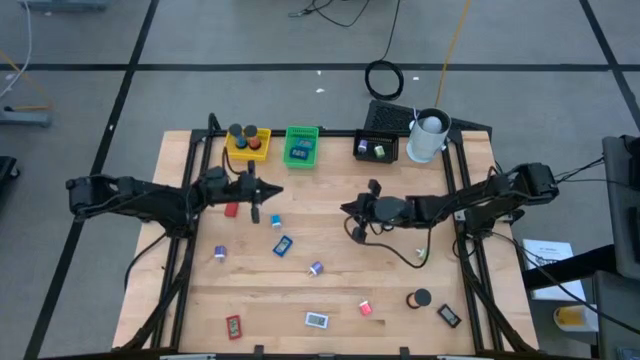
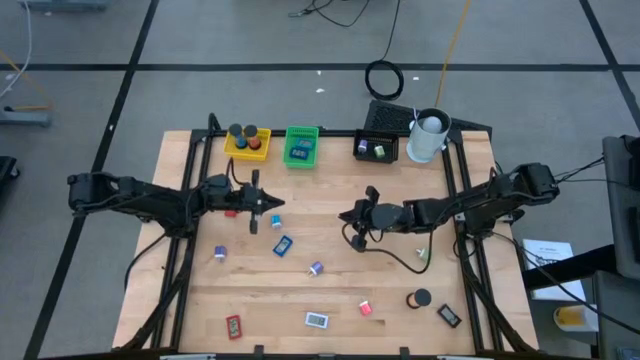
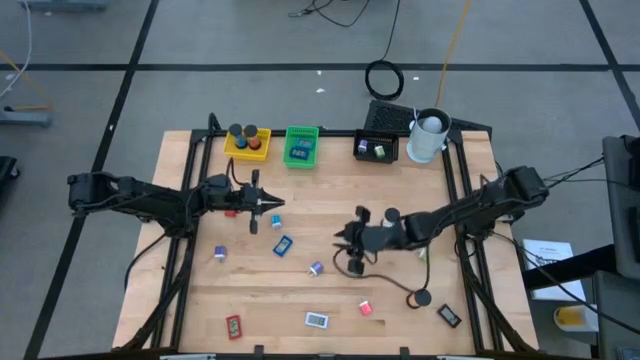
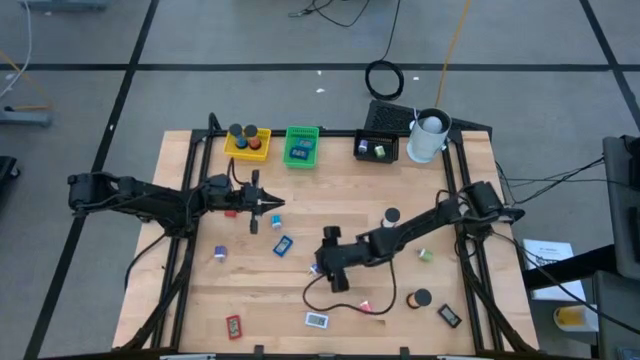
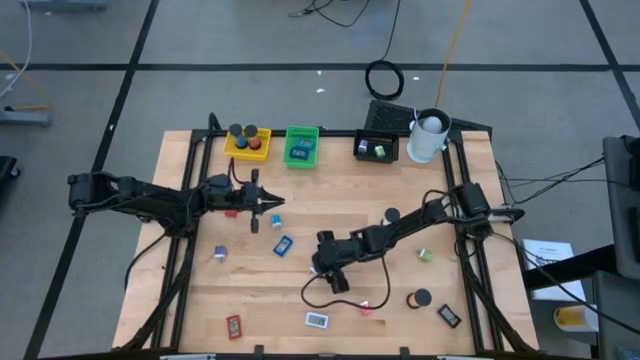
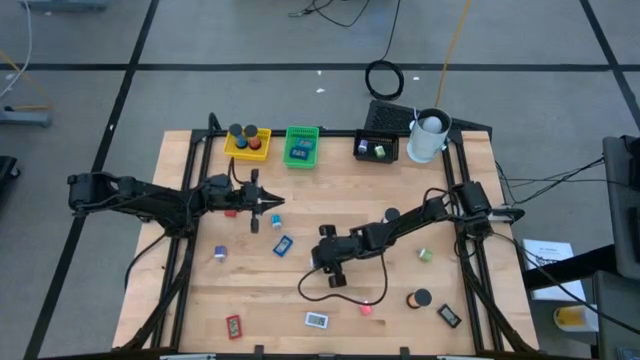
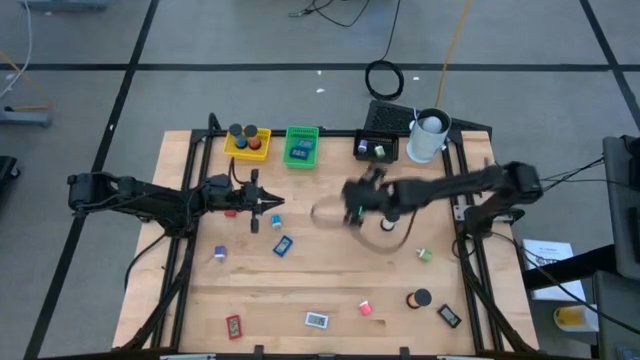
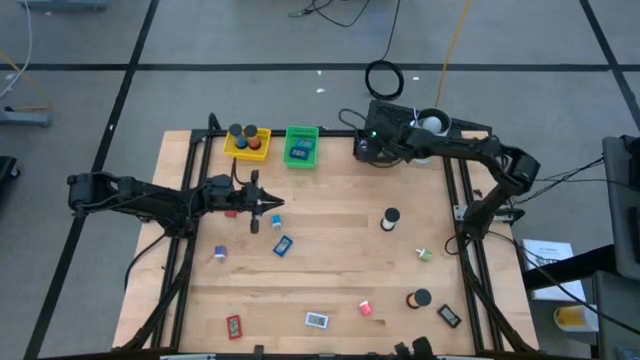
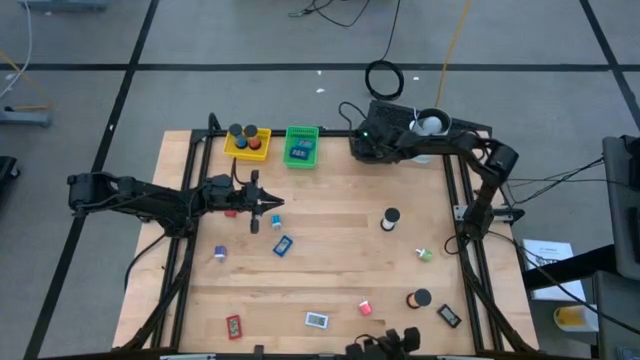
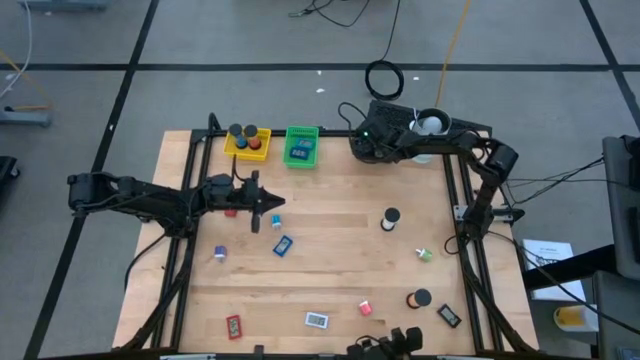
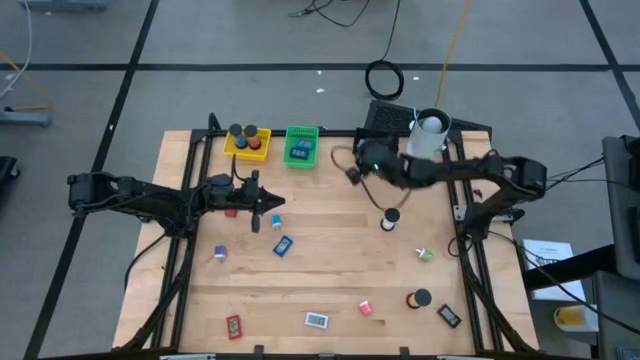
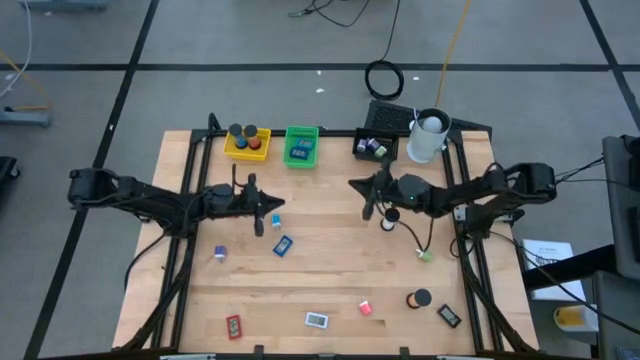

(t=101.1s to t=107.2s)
Task: Pick & Place Office items
Put the right blue charger adapter into the black bin

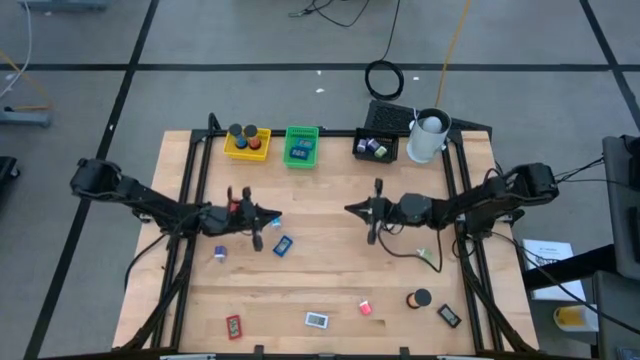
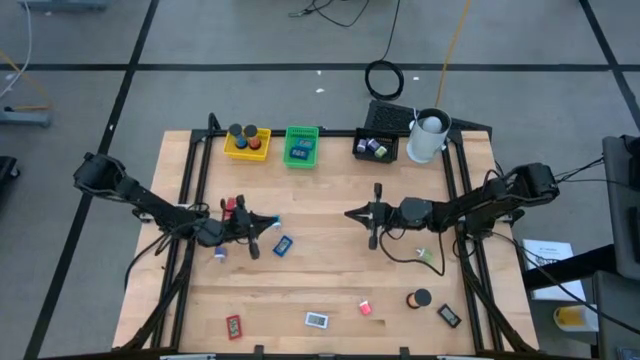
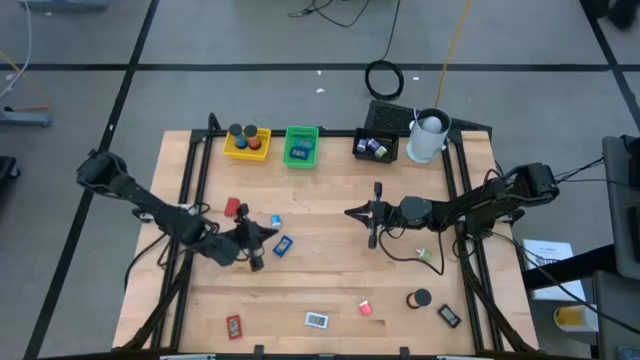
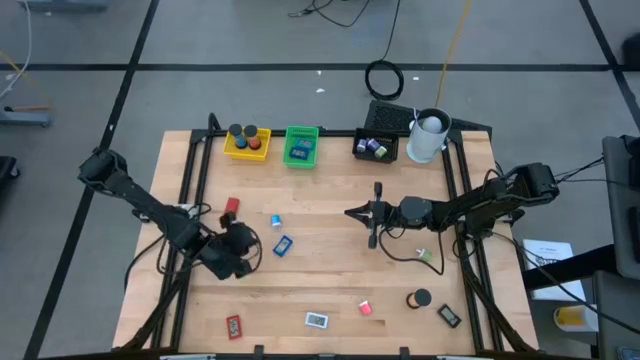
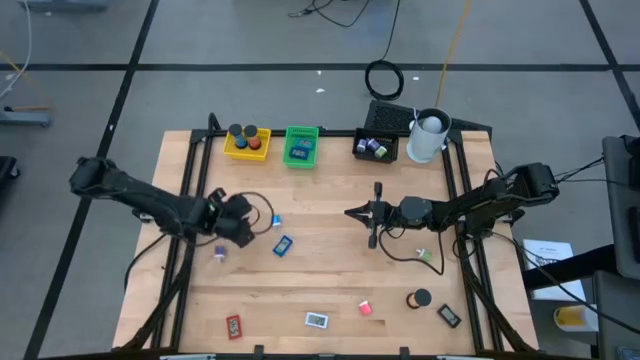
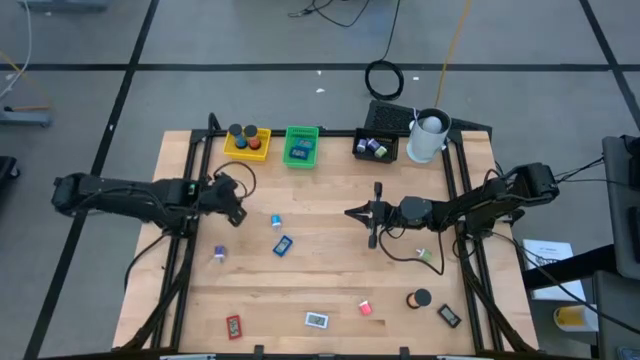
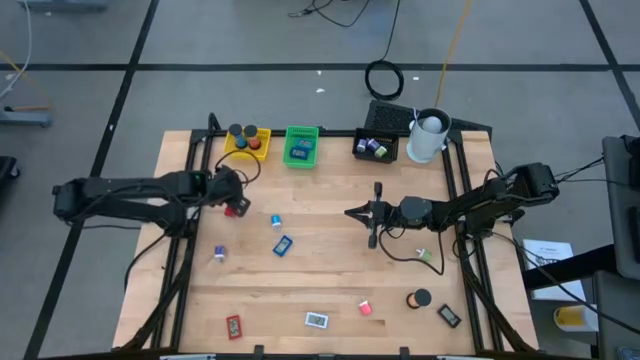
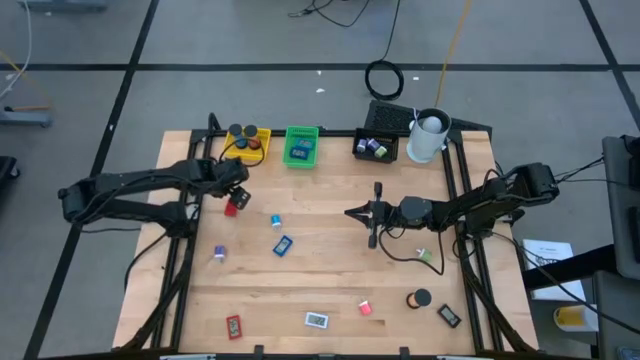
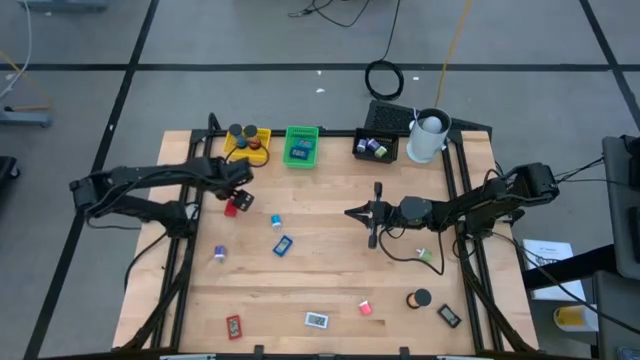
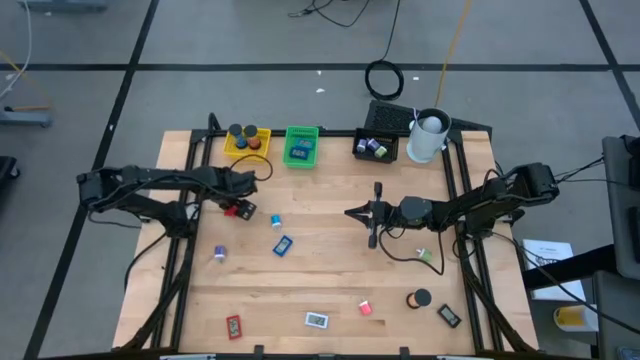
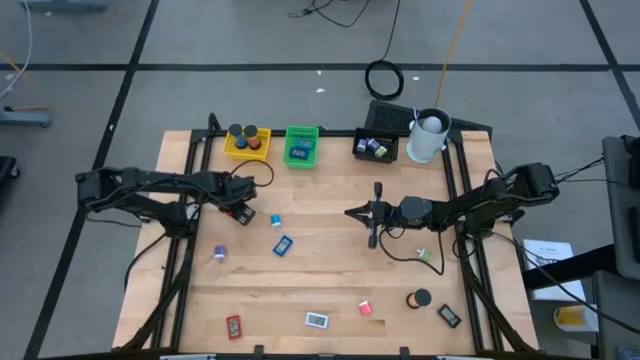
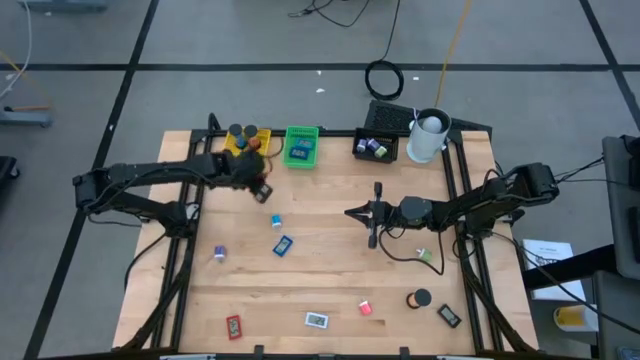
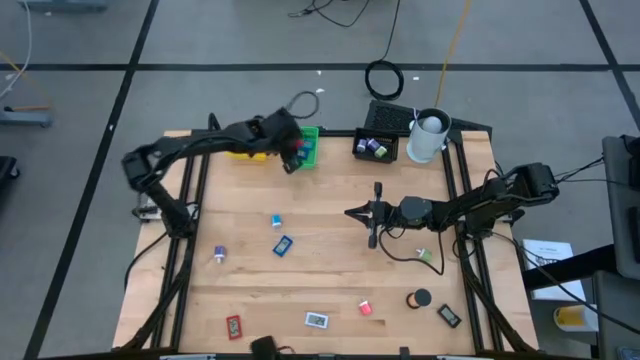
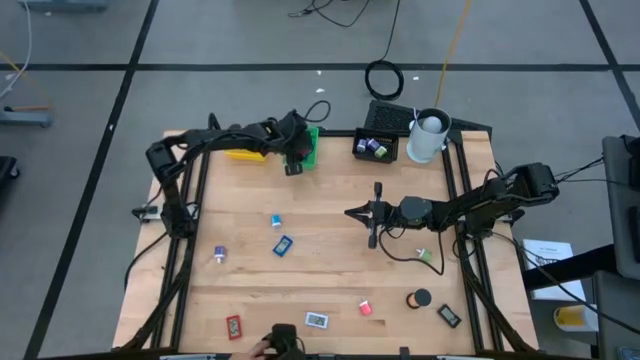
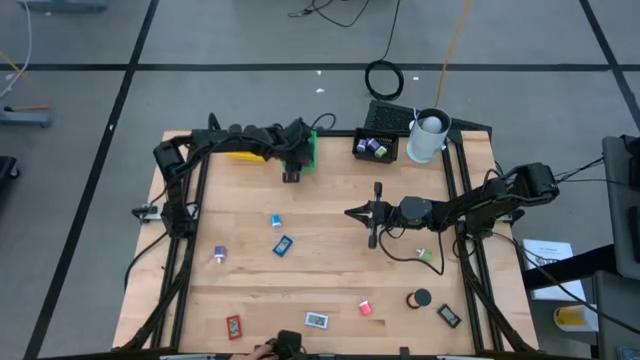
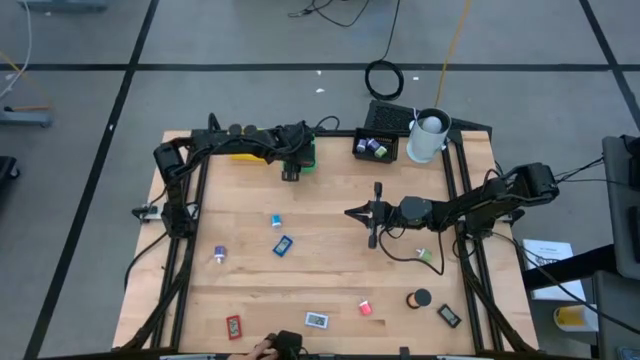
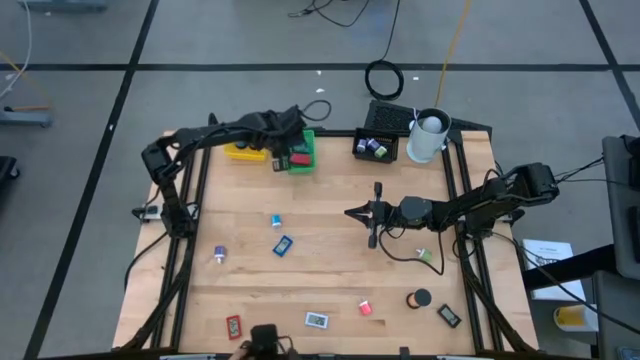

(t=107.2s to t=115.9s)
Put the top red digital timer into the green bin

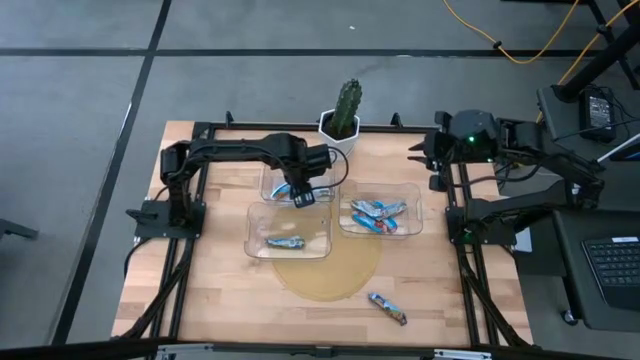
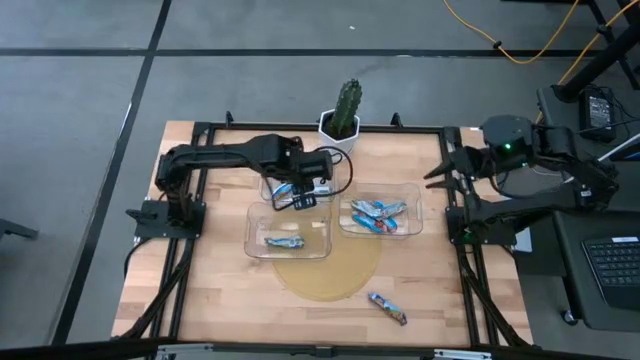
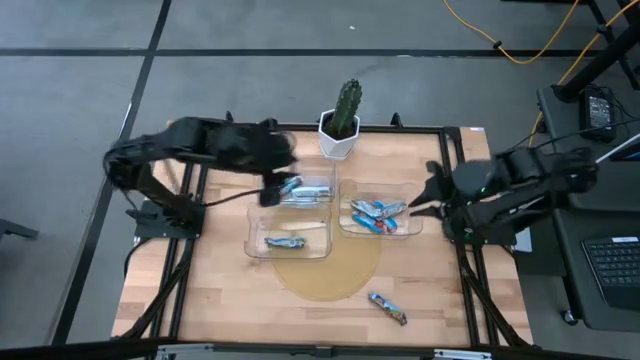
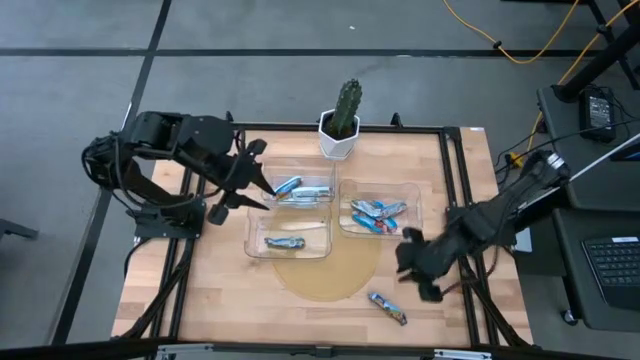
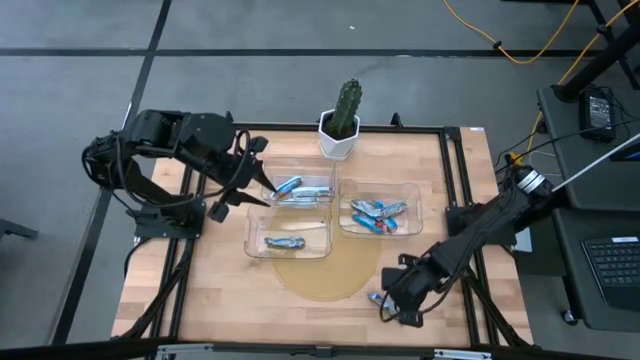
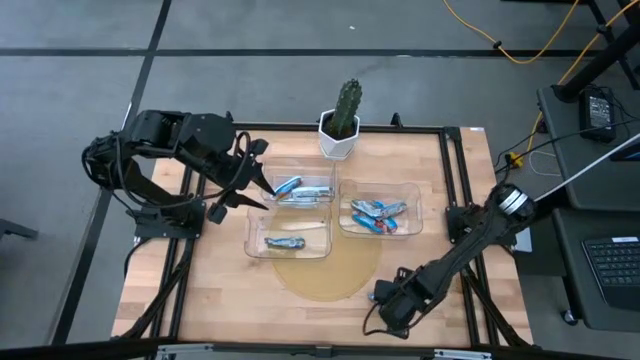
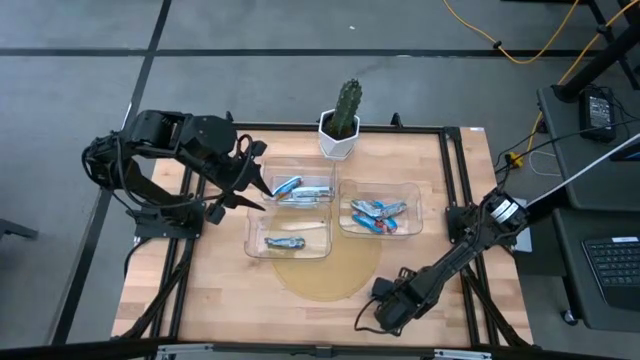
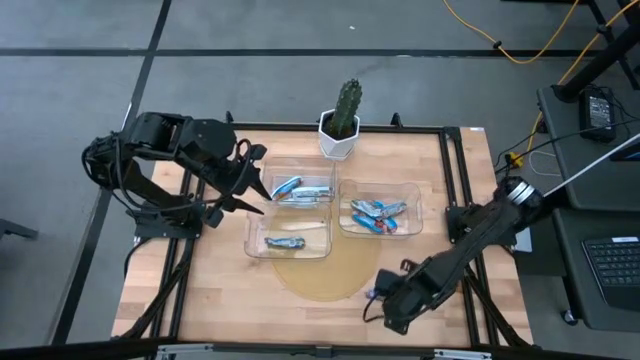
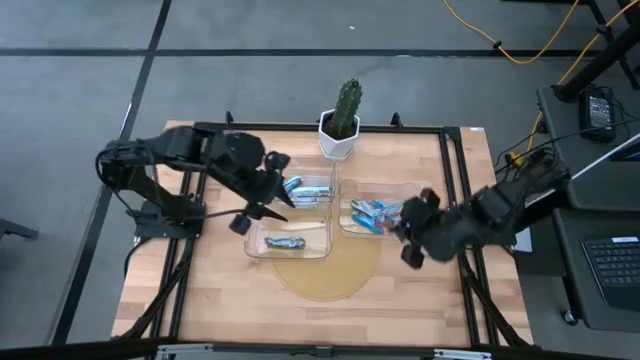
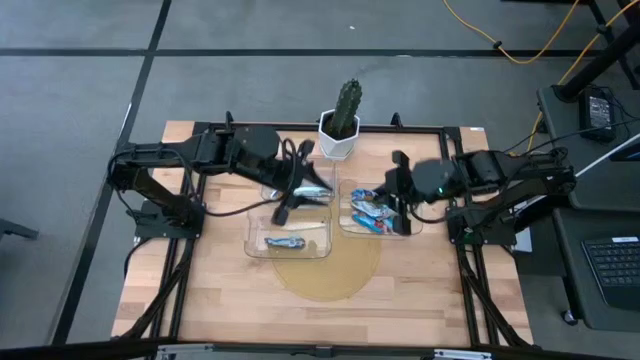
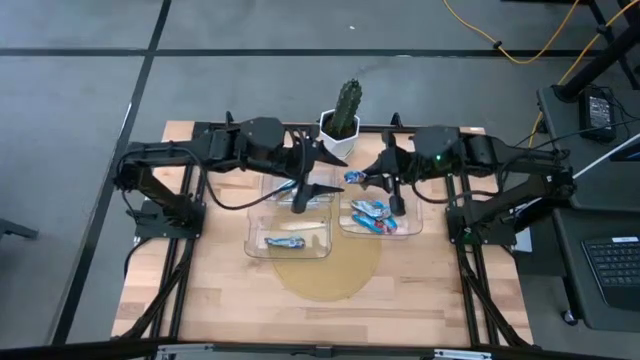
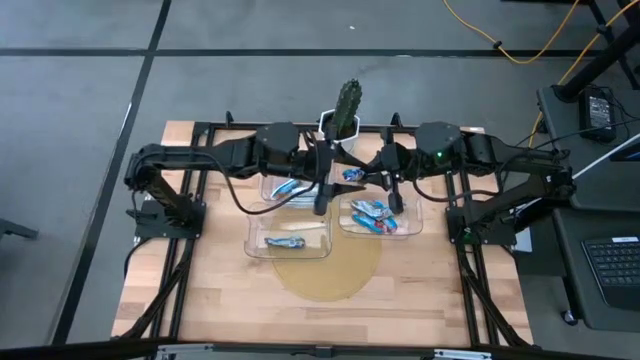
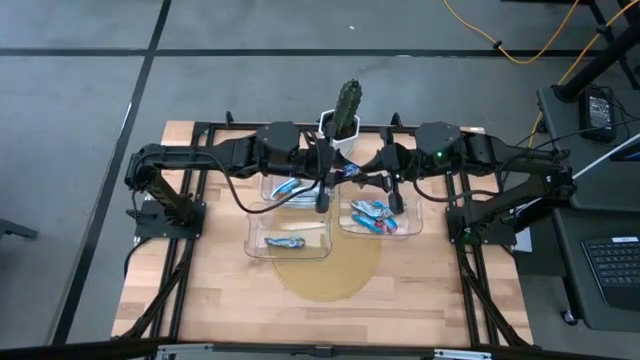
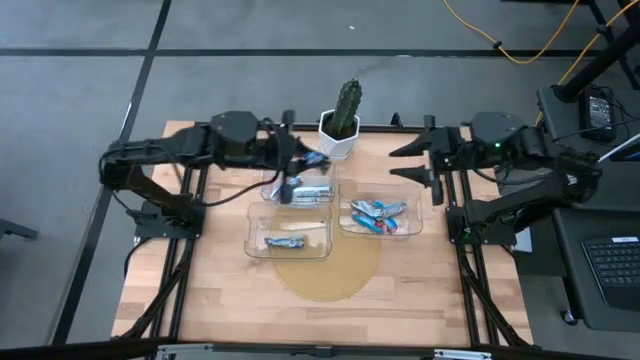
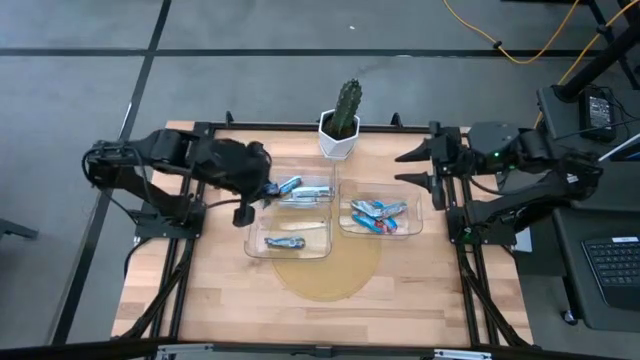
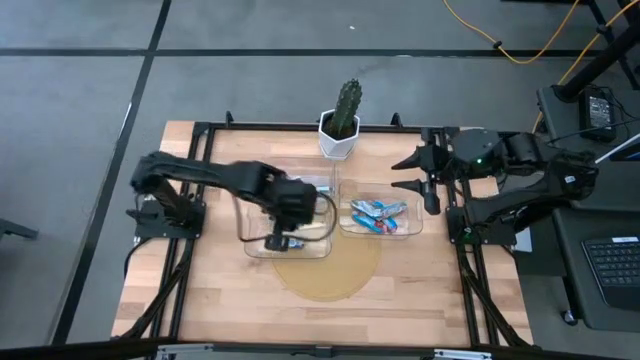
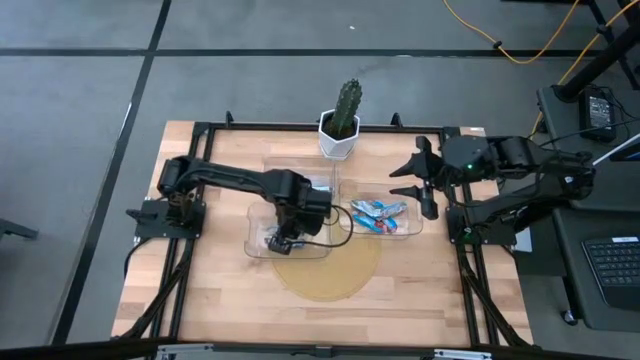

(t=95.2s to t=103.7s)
Task: Pick and place Granola Bars by type
Put the blue granola bar into the bottom bin
